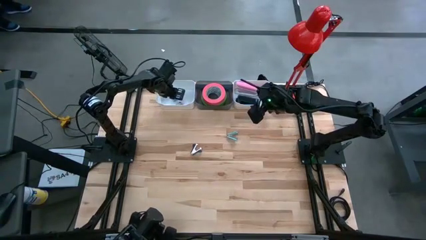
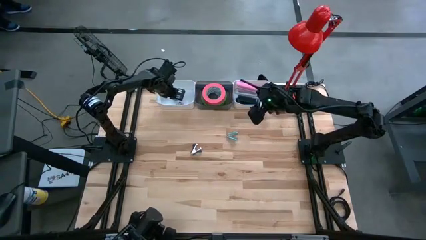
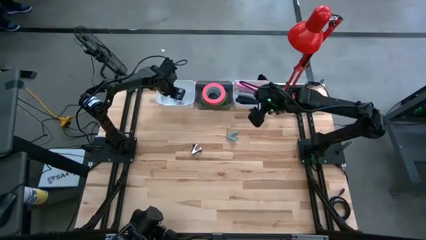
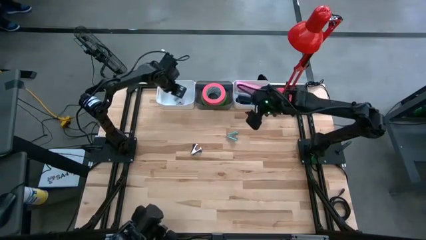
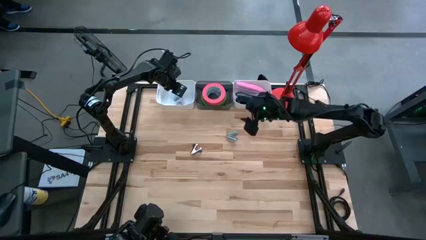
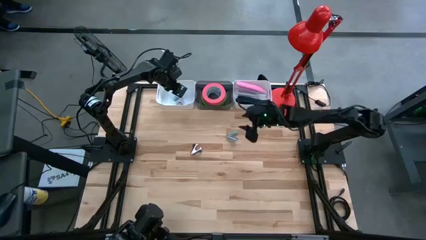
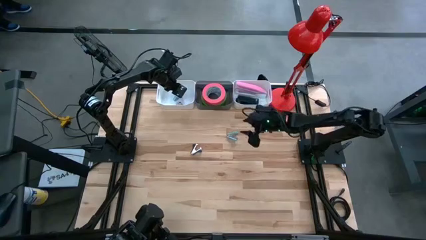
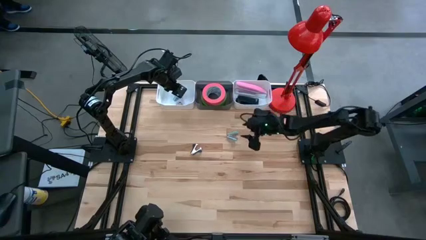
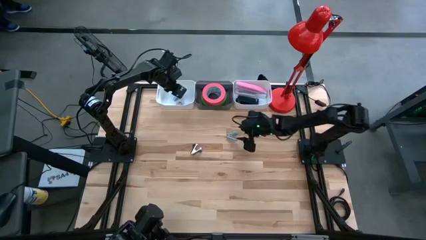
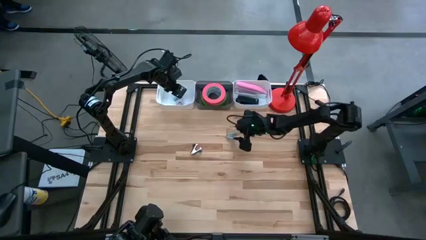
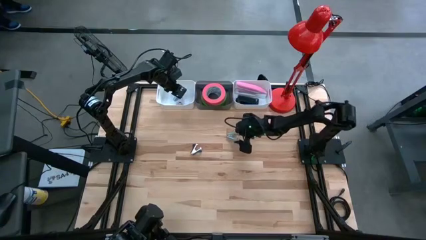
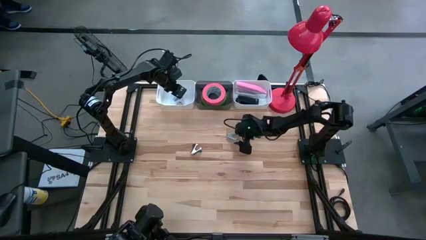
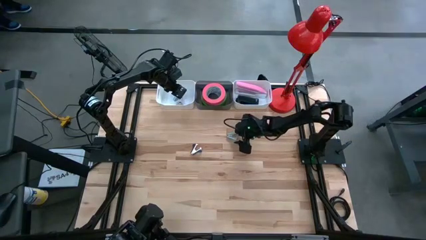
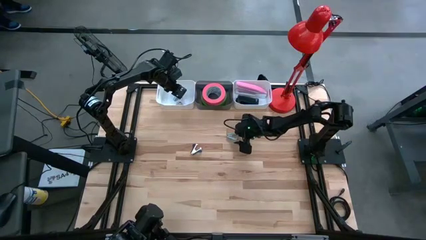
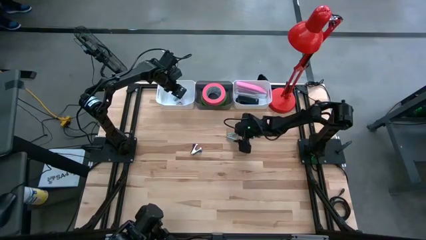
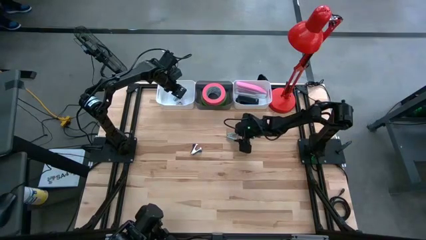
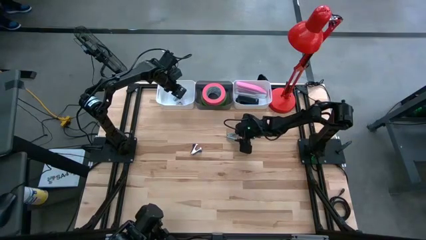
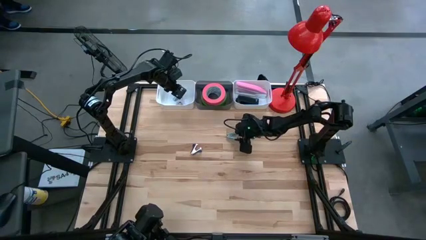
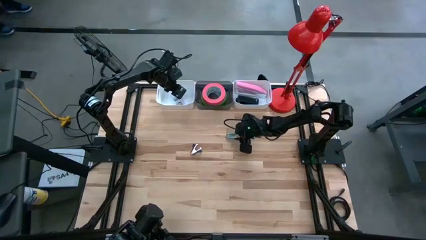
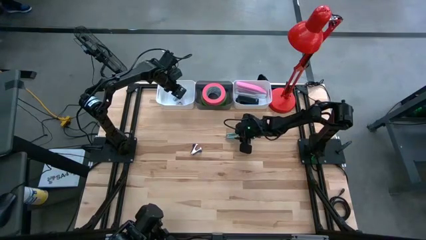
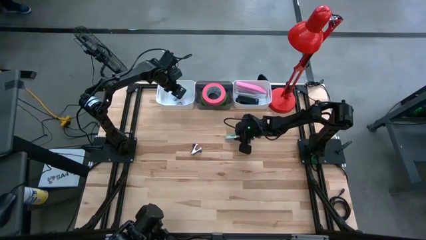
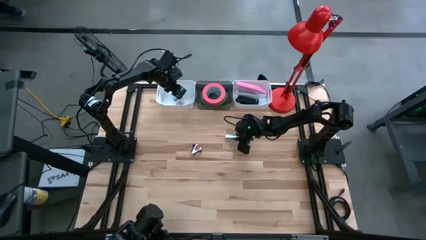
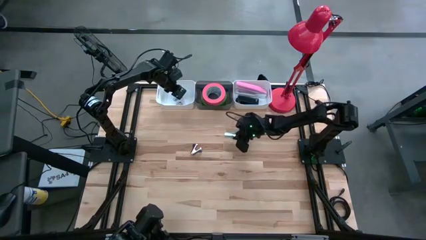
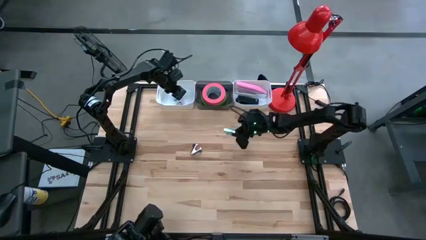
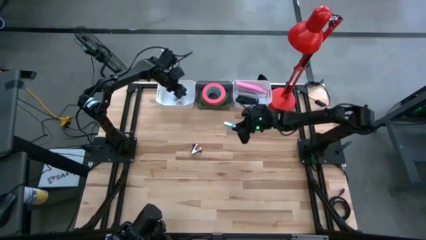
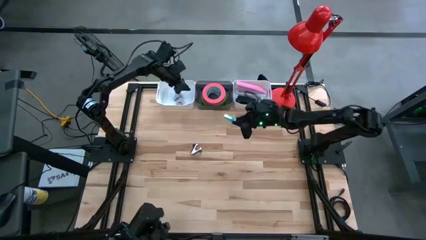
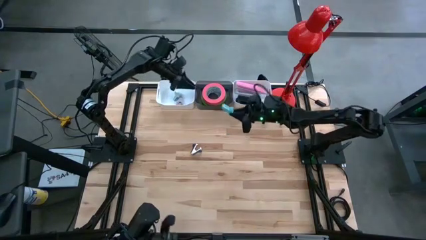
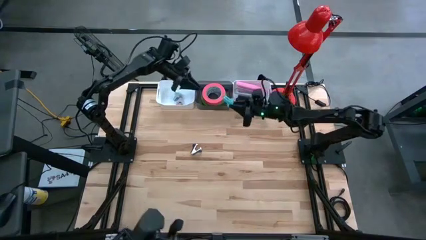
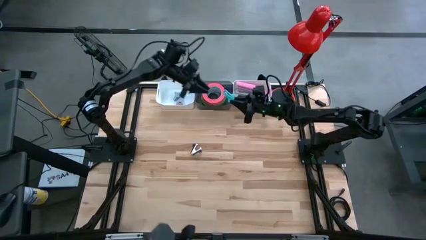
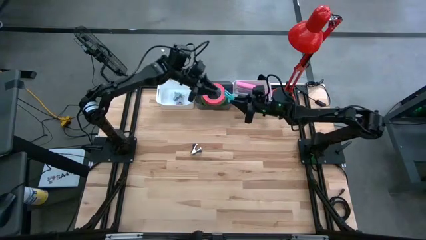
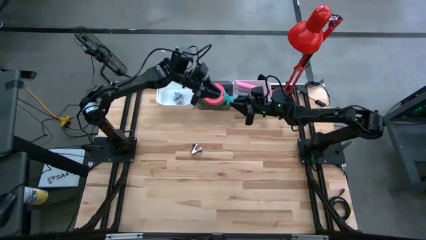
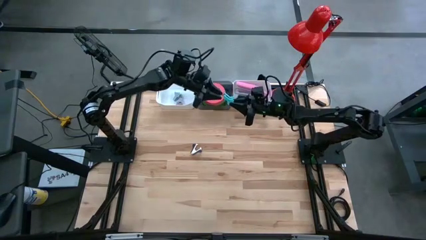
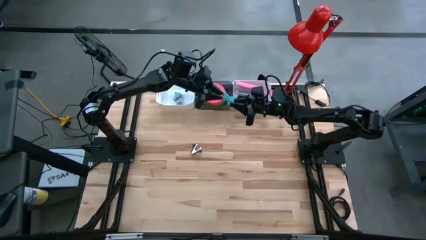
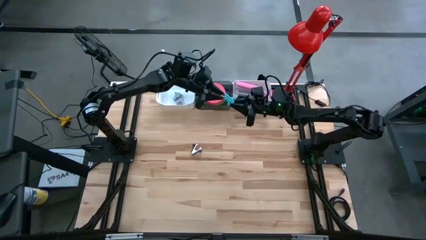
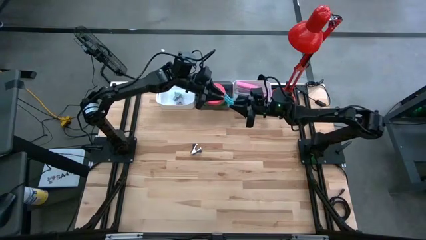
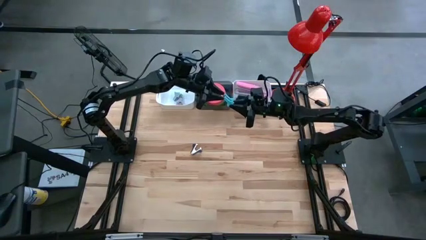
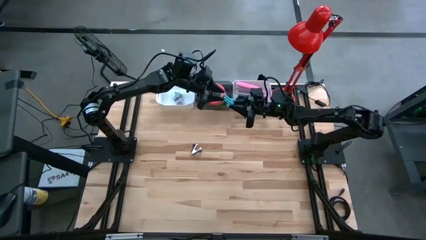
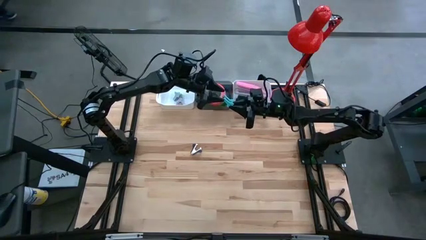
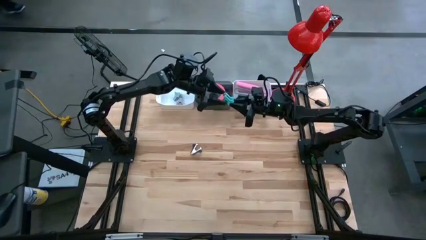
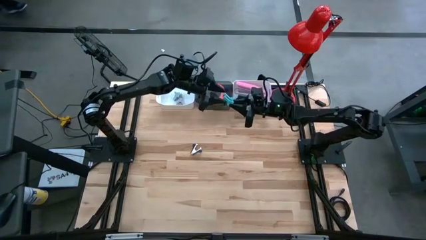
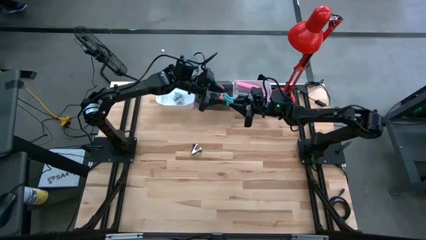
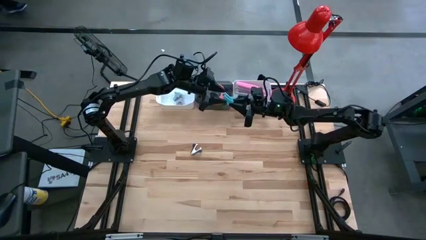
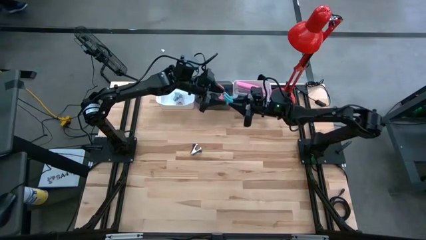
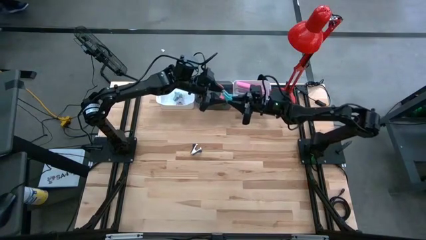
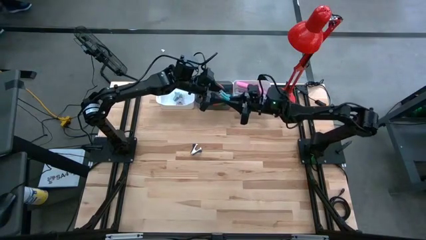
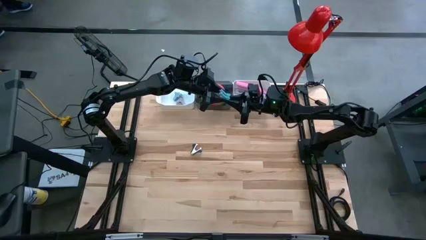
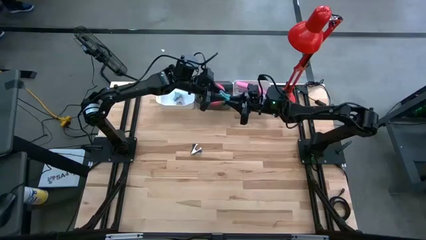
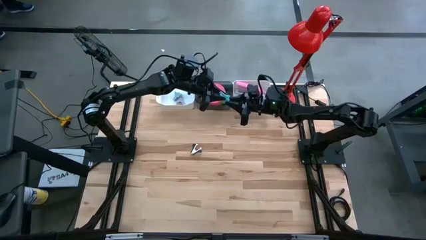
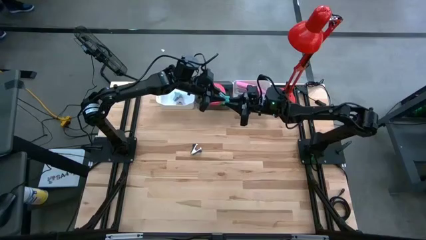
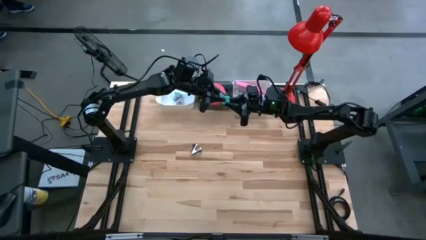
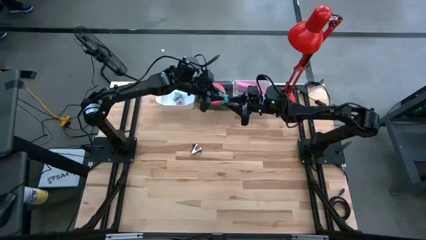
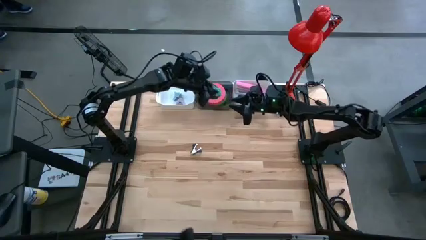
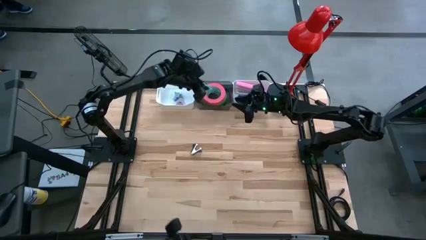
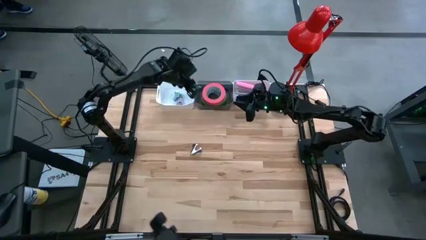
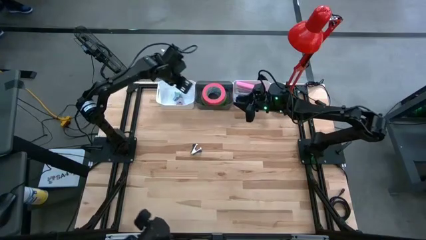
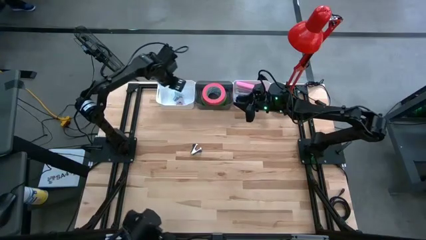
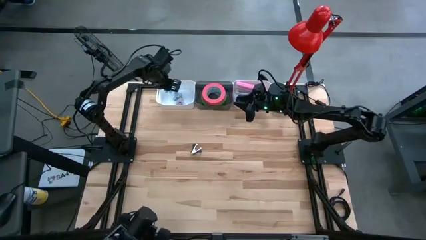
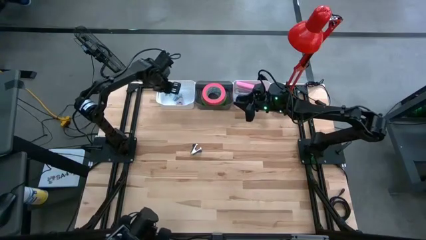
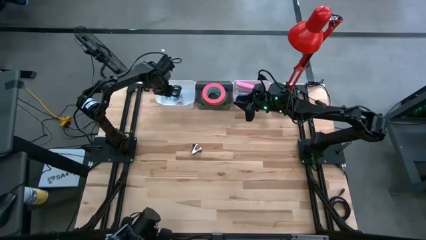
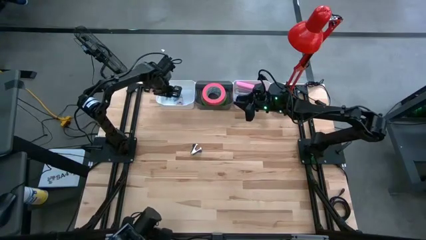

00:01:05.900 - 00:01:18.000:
Task: Pick and place Stapler, Stapler remover, tape
Put the light blue staple remover into the white bin
